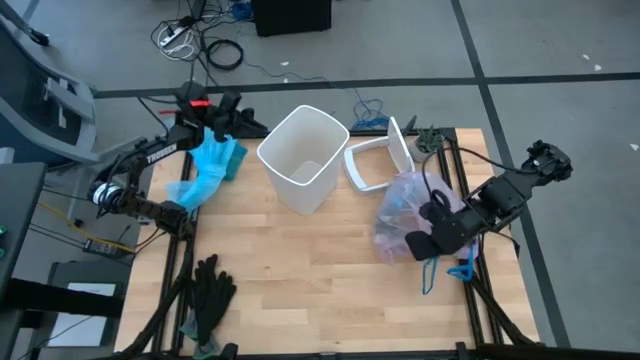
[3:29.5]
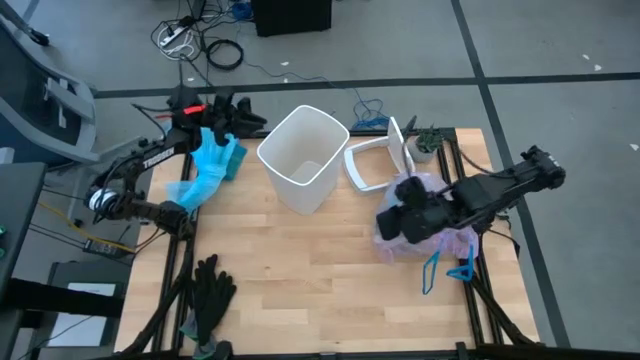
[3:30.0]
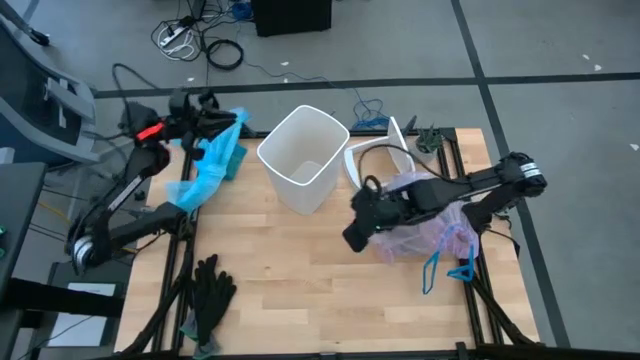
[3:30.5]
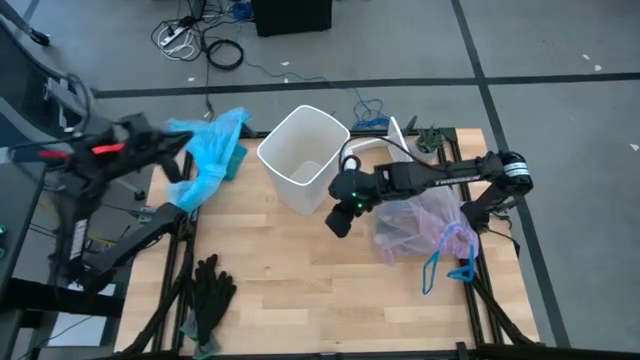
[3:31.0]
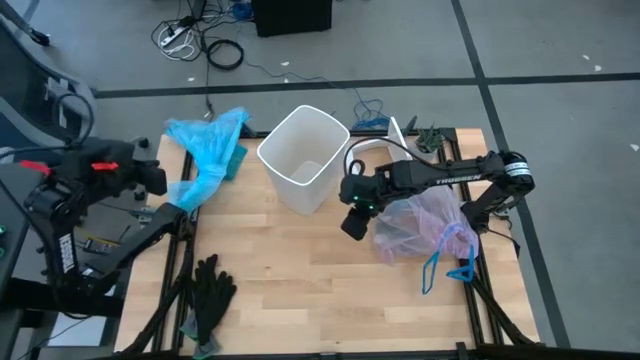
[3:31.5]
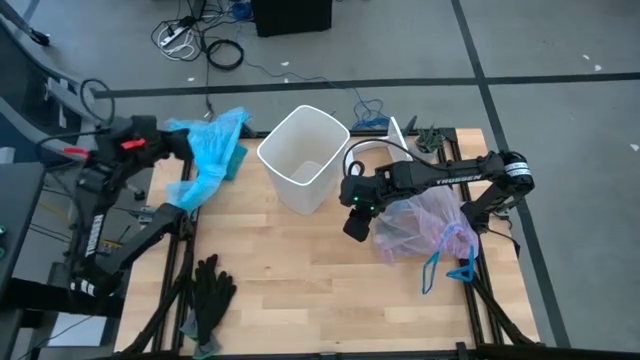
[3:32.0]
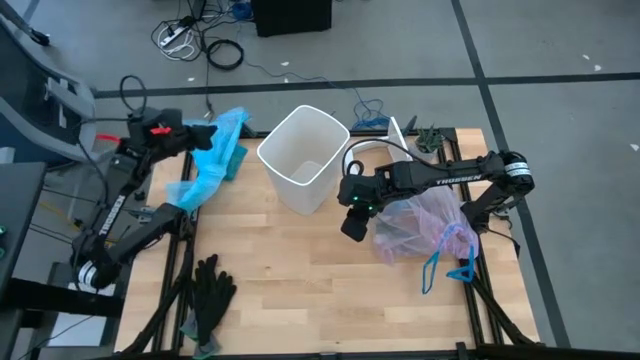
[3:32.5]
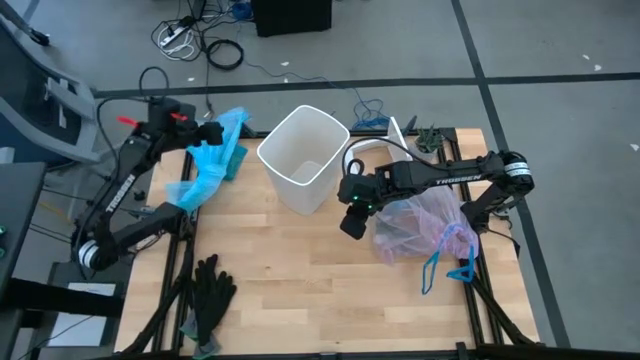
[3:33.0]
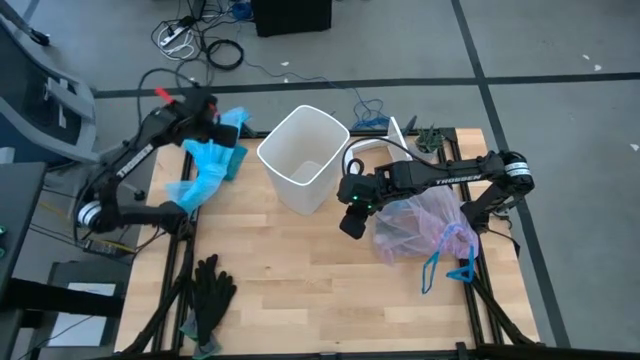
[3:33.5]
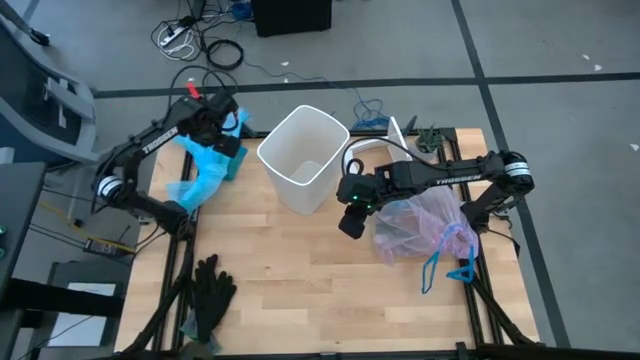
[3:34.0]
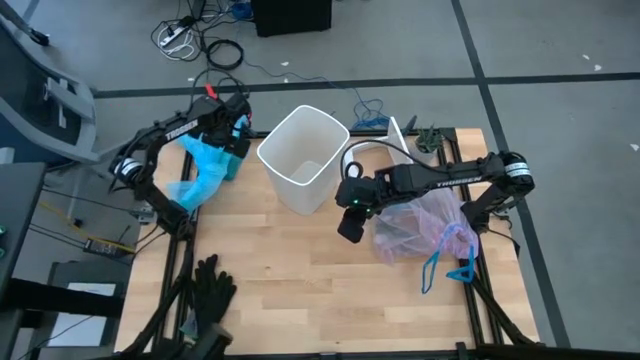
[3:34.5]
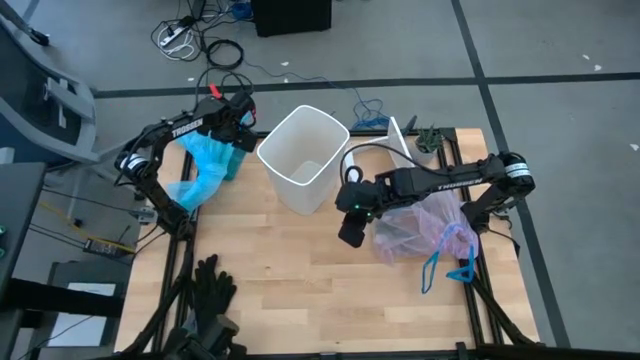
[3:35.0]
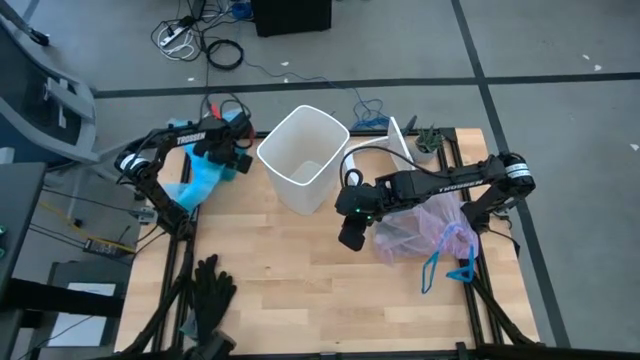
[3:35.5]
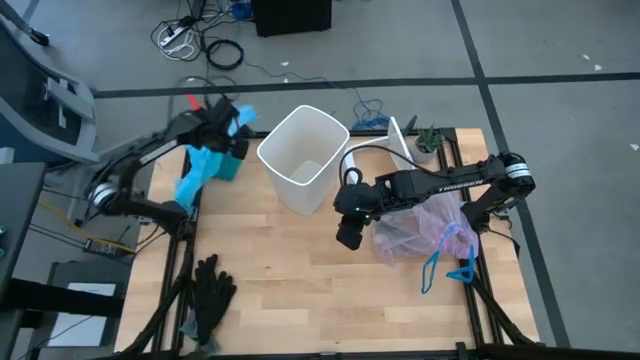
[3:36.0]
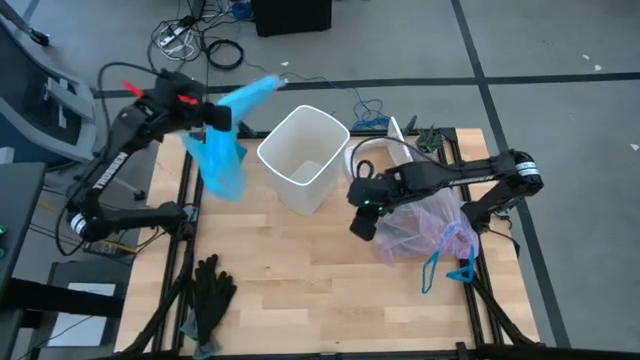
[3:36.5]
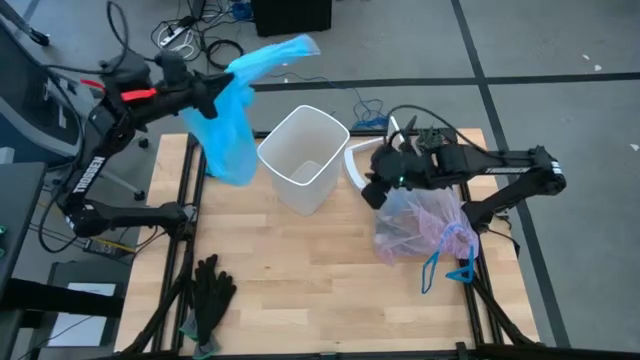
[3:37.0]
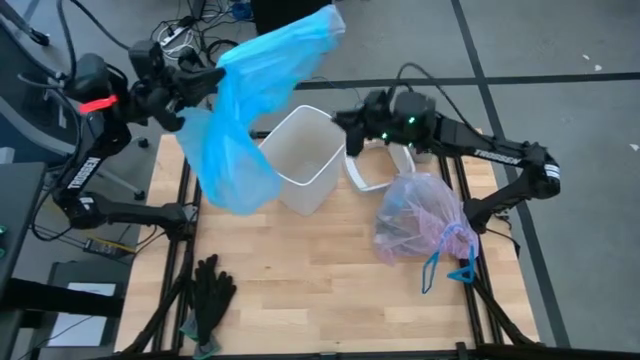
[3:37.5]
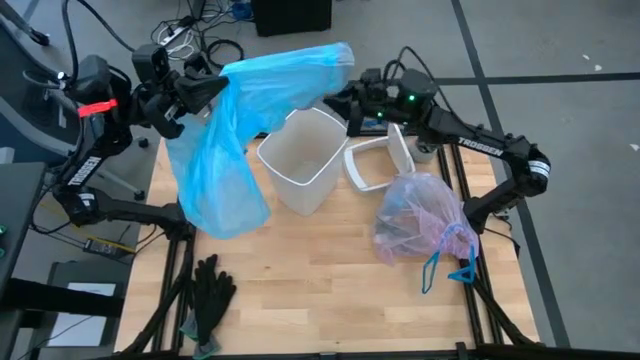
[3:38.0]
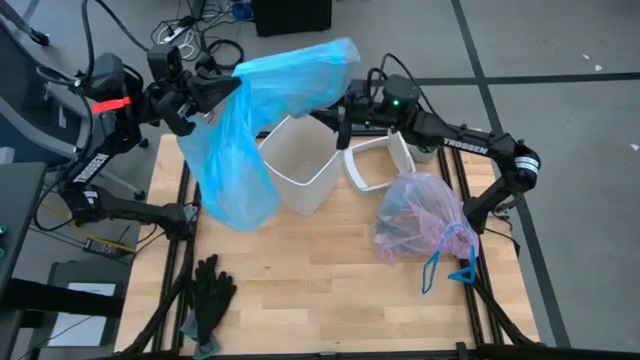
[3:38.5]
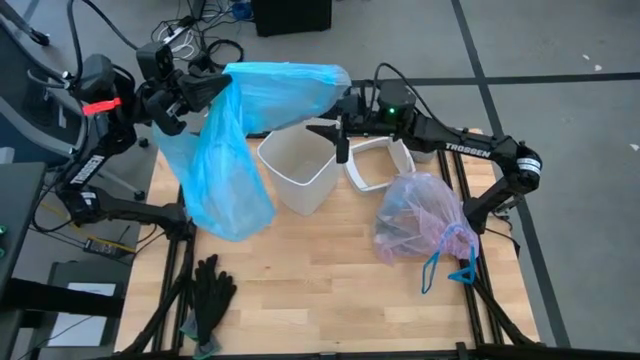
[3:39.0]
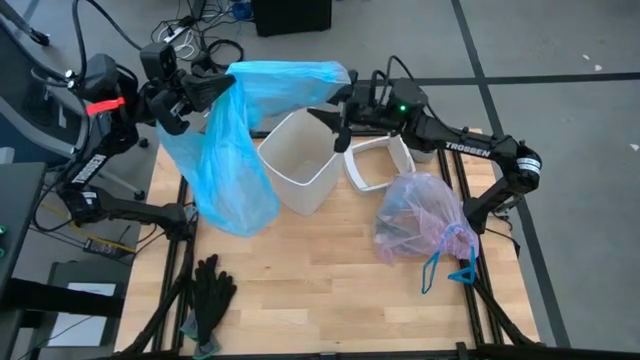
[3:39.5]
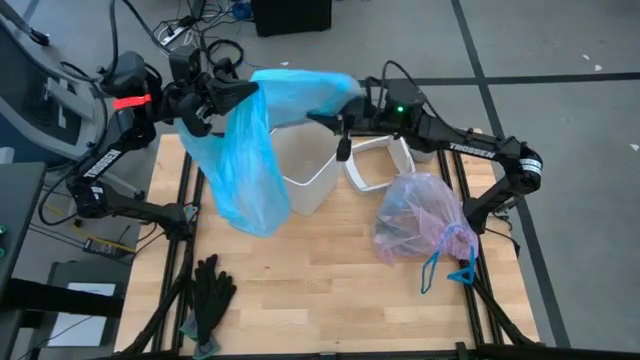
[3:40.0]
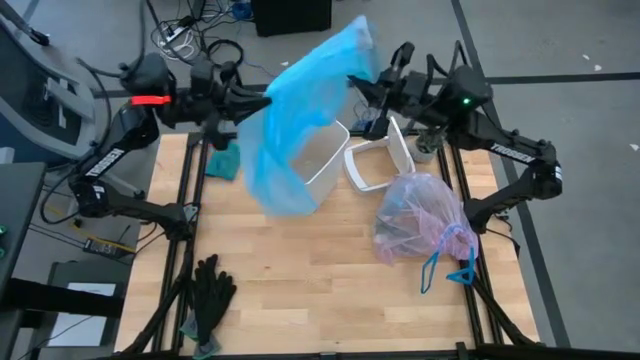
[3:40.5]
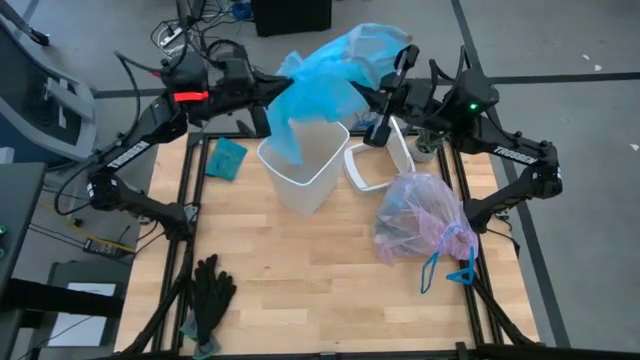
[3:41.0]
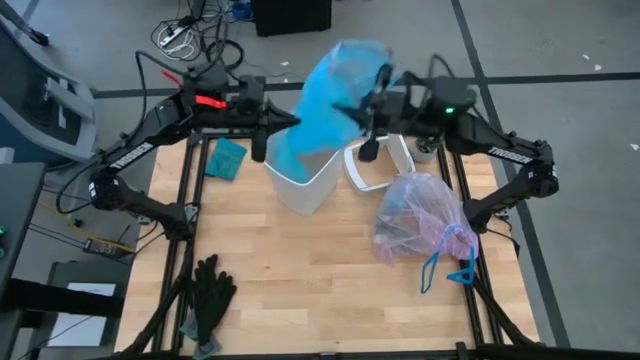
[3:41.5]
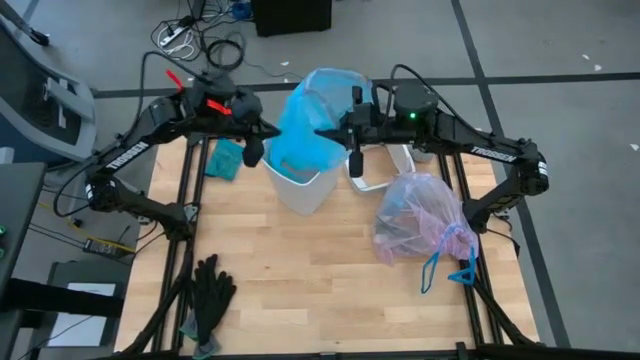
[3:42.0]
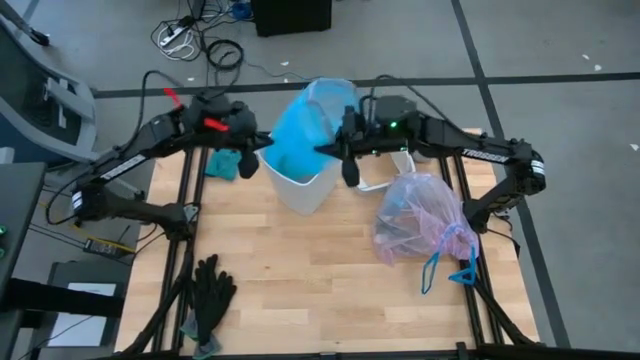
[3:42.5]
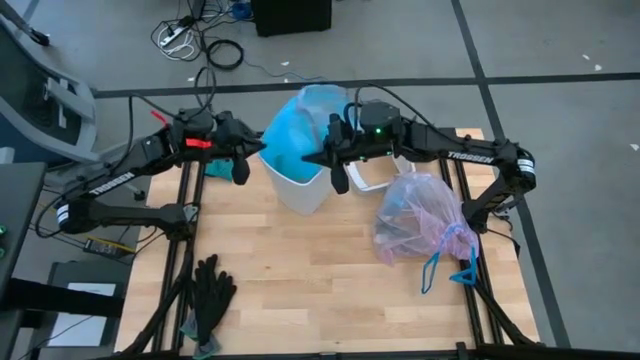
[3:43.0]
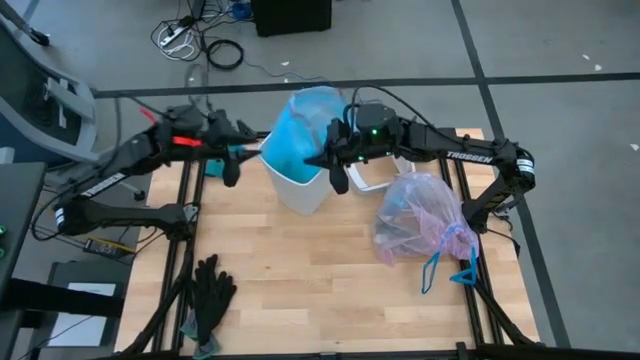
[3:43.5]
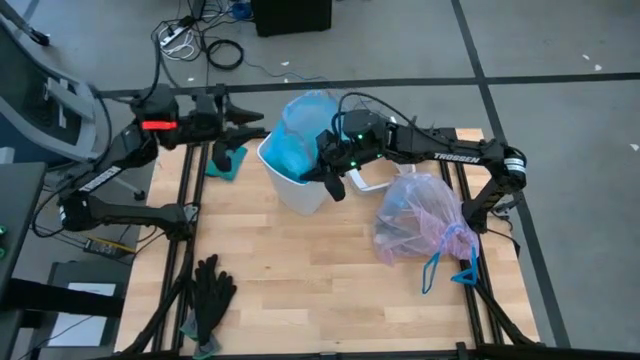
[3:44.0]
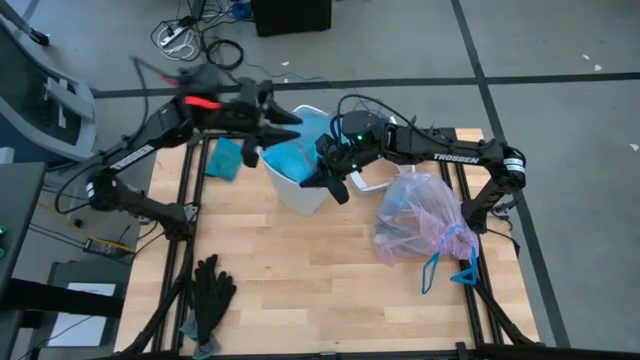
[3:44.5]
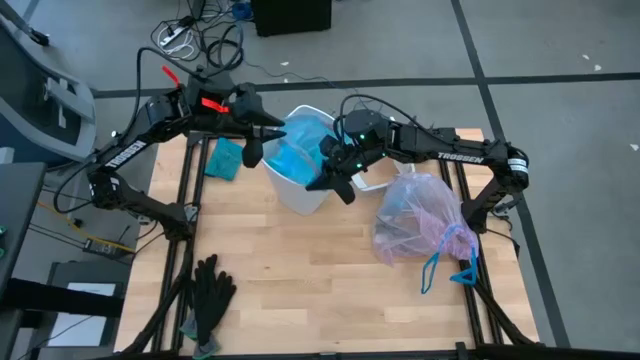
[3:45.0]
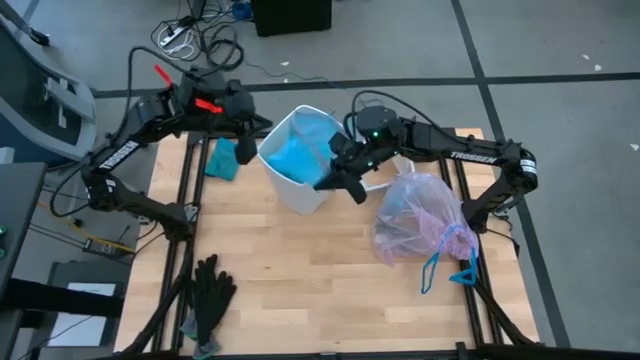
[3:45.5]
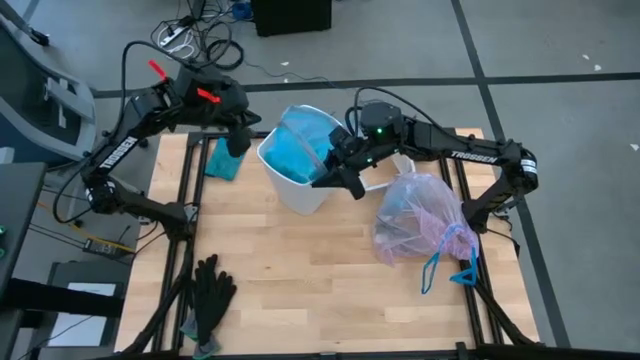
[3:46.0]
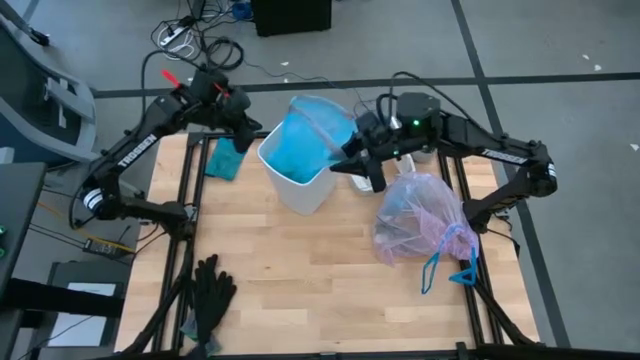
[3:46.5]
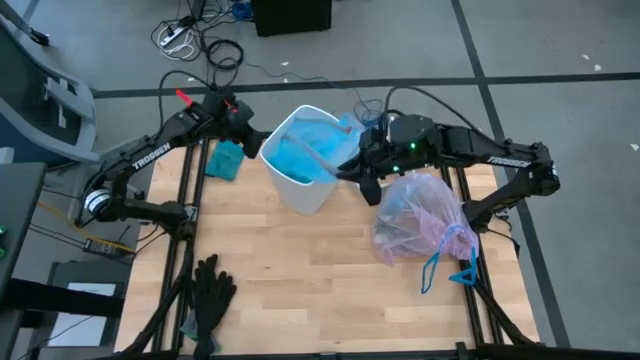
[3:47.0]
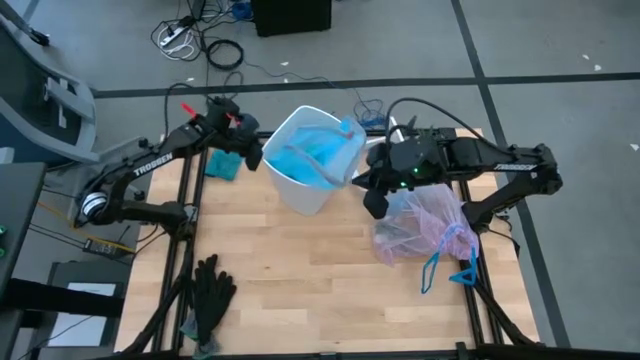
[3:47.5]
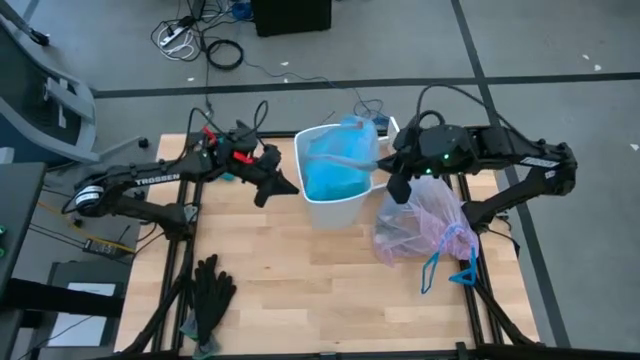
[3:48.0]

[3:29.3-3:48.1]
Task: place trash/remove bag and relplace
Put the blue trash bag in the trash bin

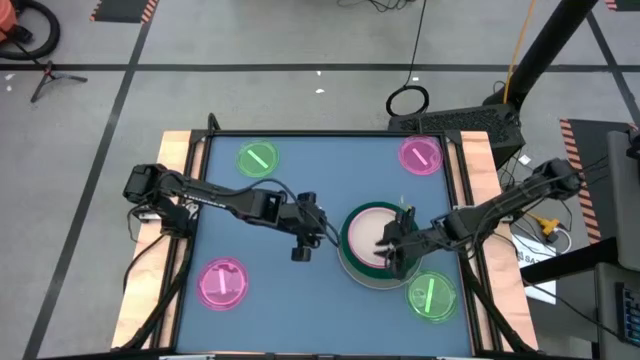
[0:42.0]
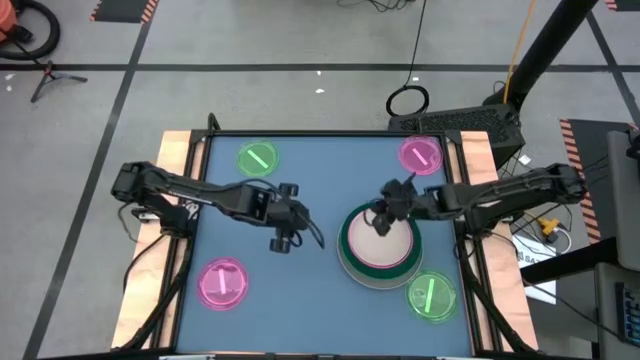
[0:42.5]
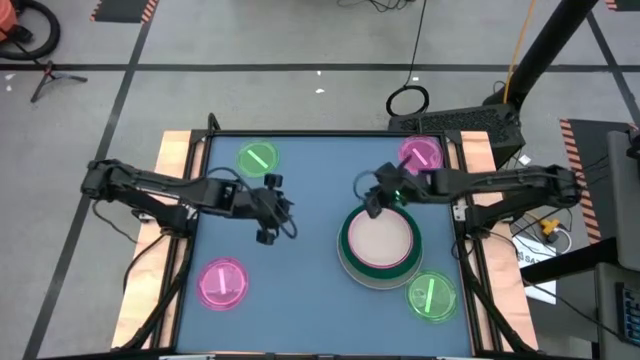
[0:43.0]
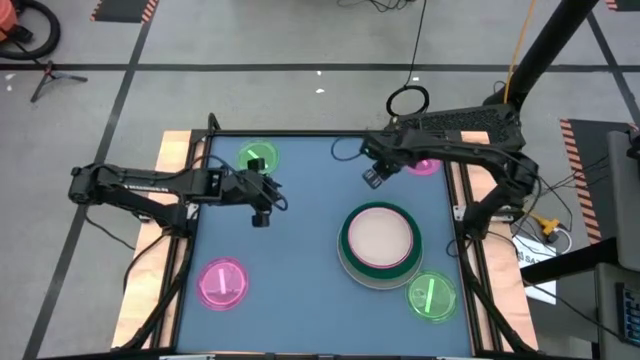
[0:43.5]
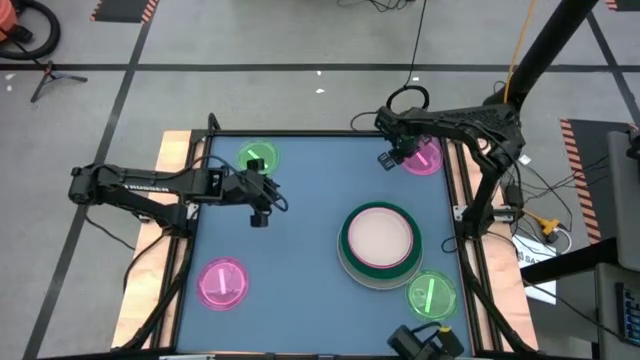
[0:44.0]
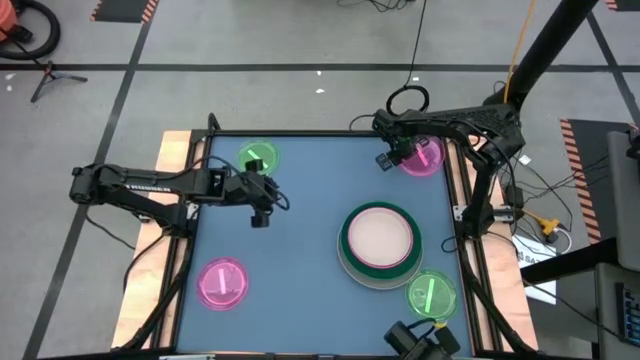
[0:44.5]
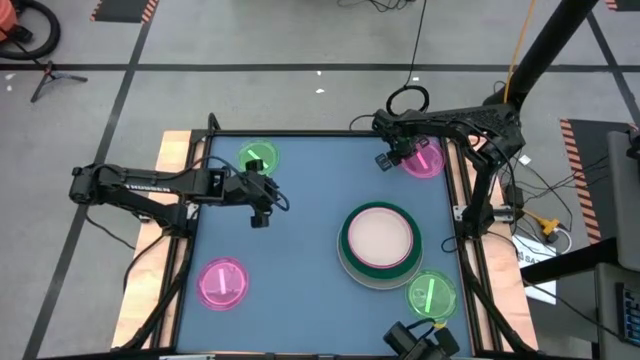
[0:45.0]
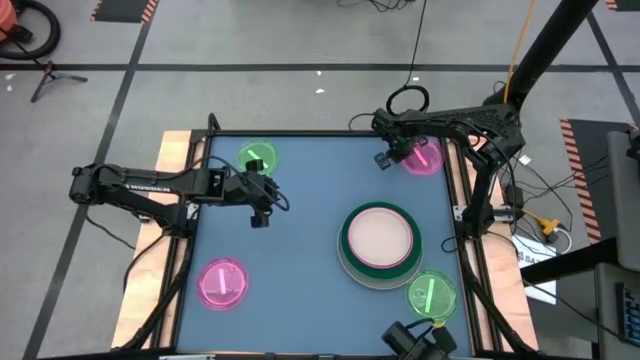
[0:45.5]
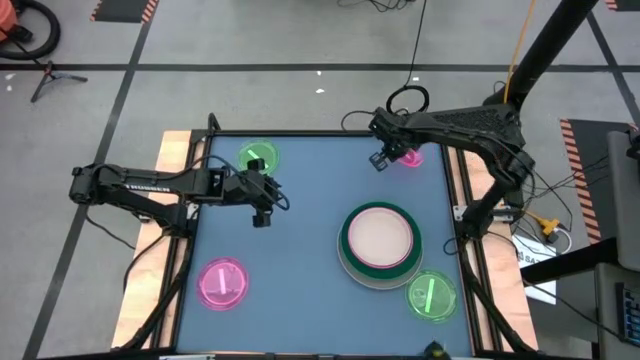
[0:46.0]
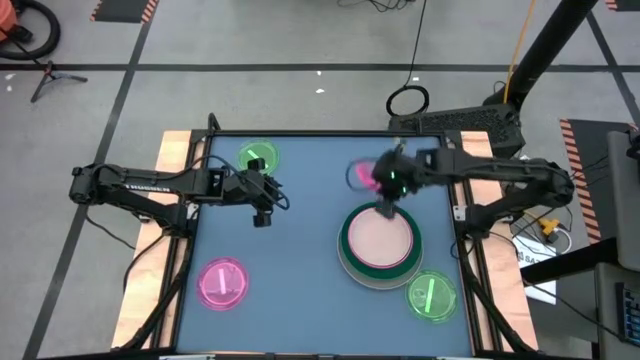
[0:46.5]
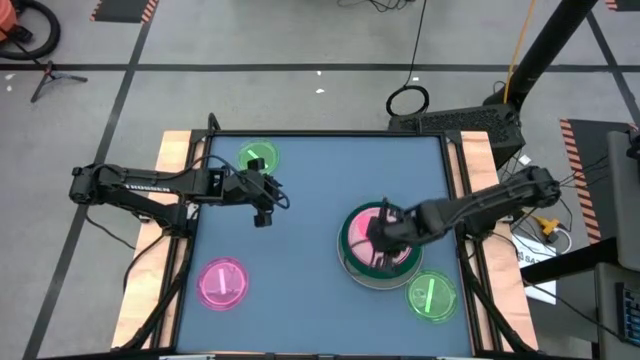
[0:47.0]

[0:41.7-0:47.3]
Task: Stack plastic plates
Stack the top light pink plate on top of the white plate
